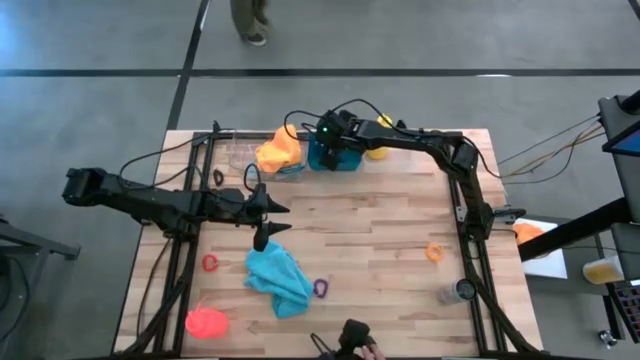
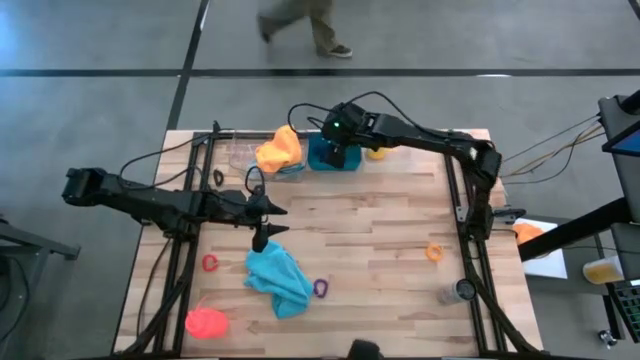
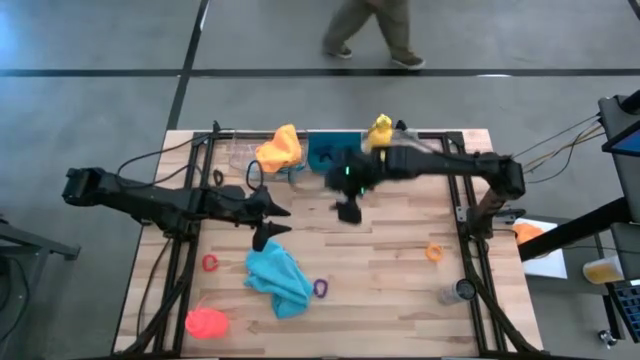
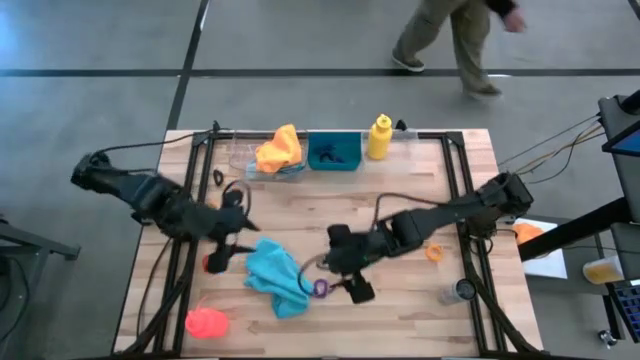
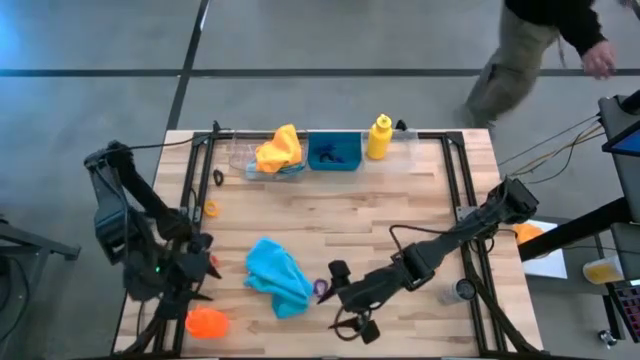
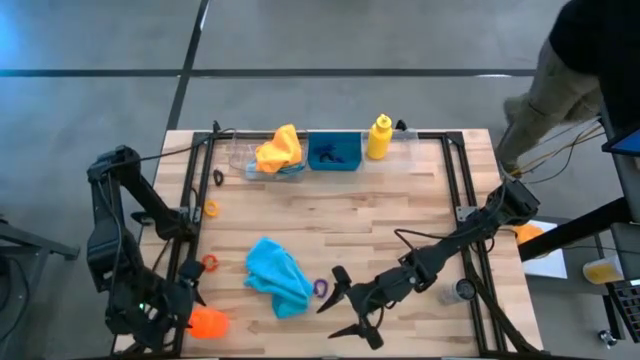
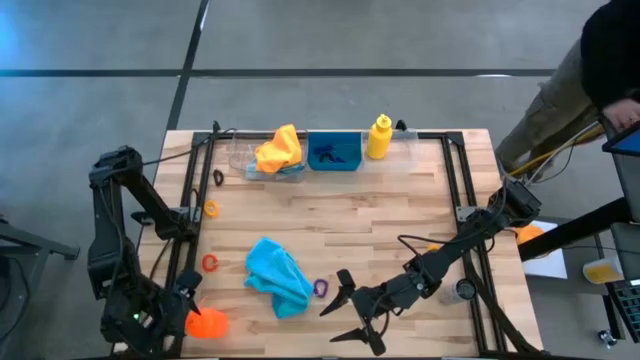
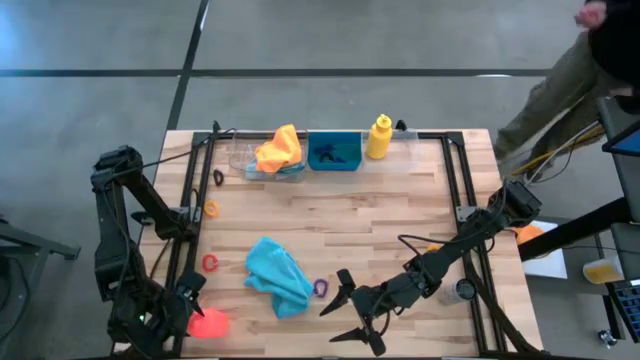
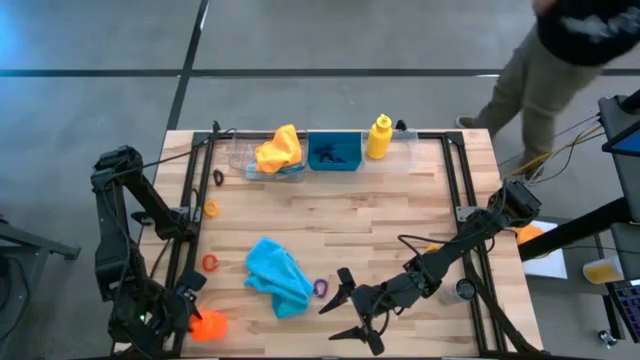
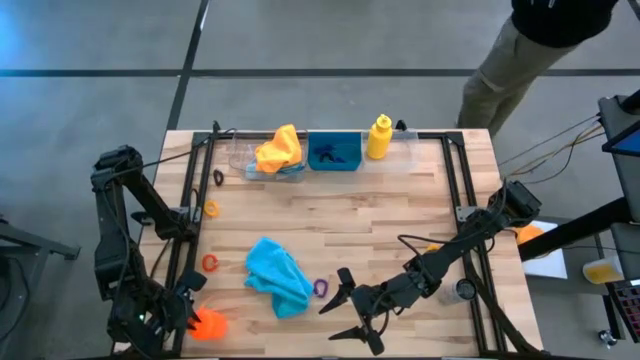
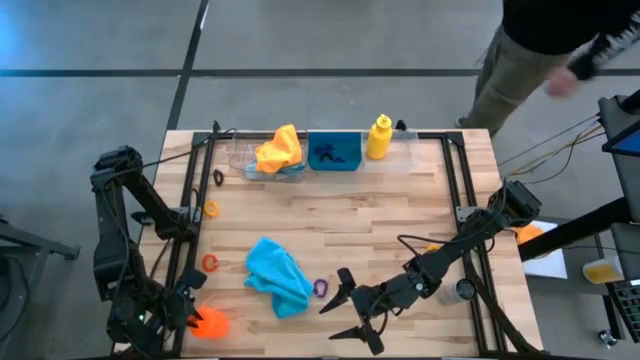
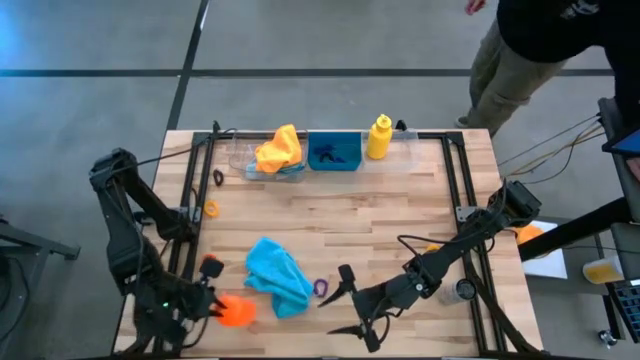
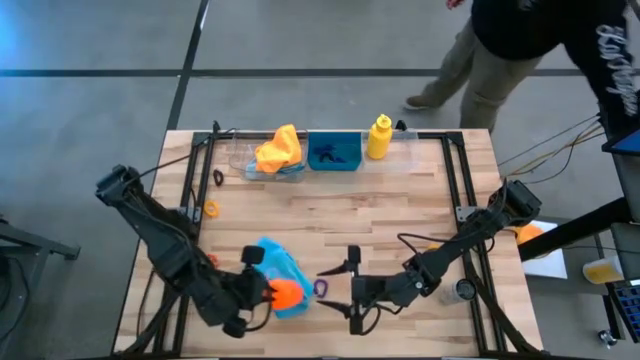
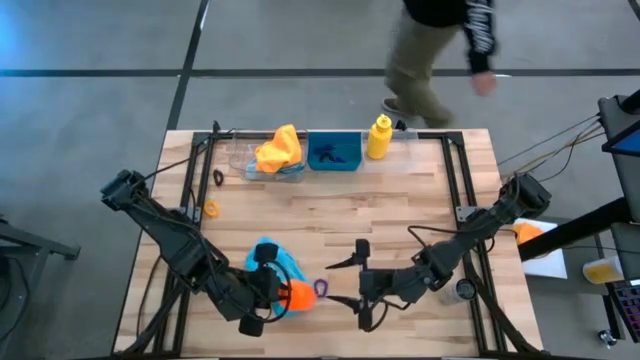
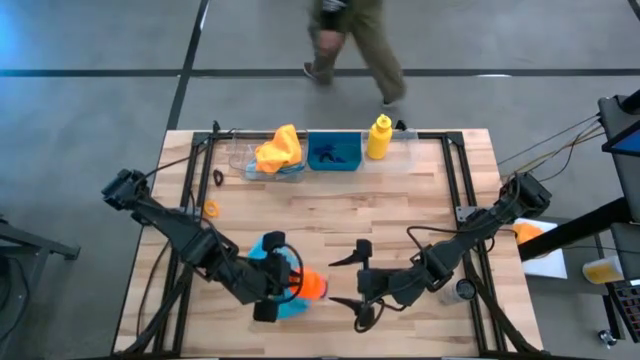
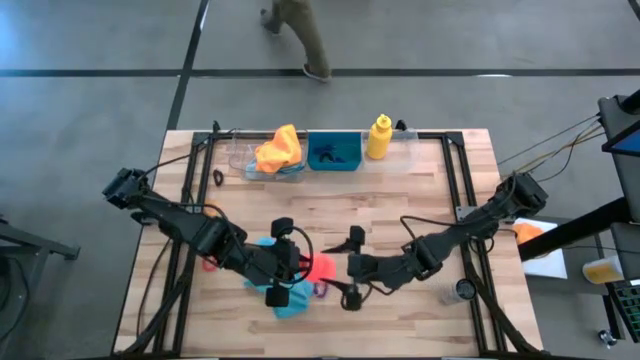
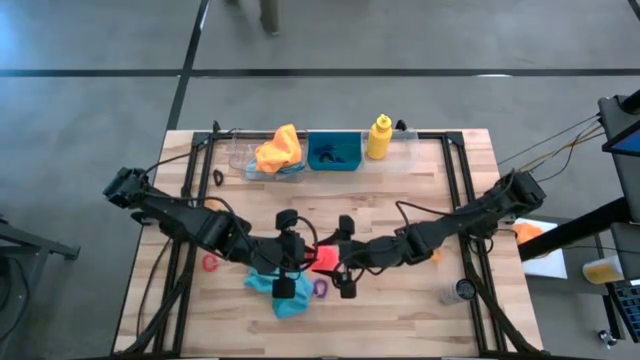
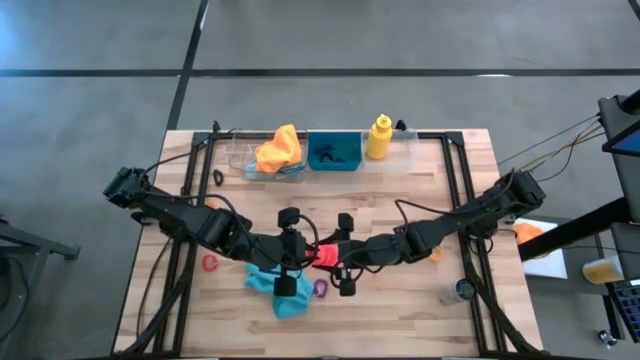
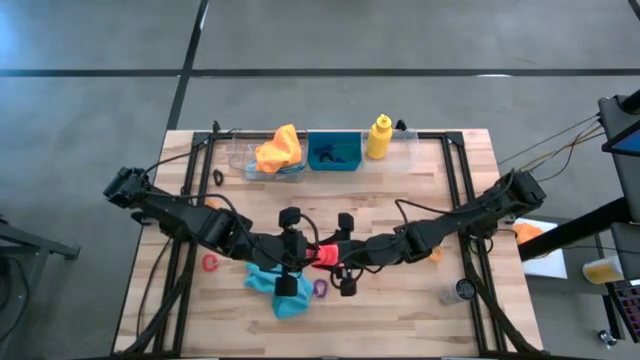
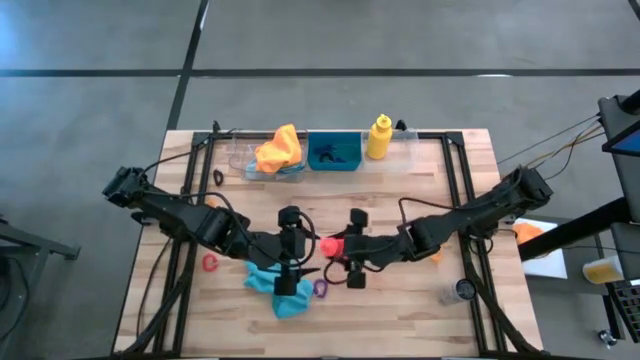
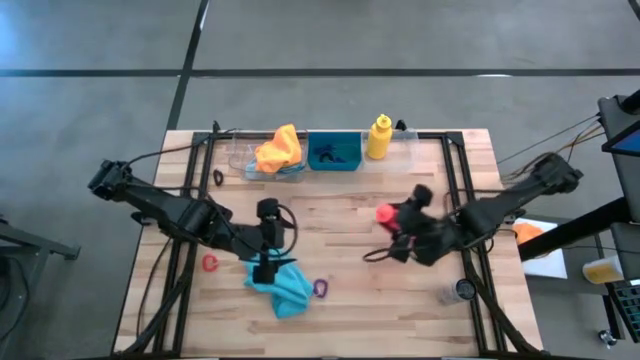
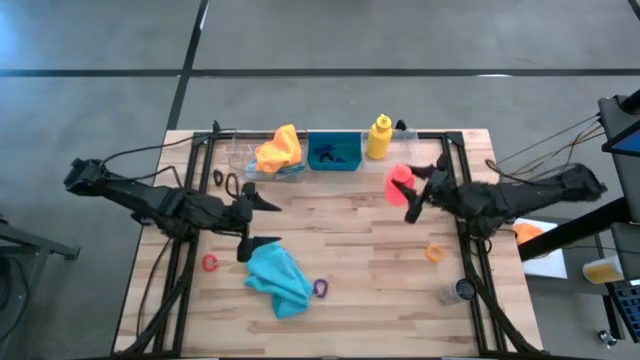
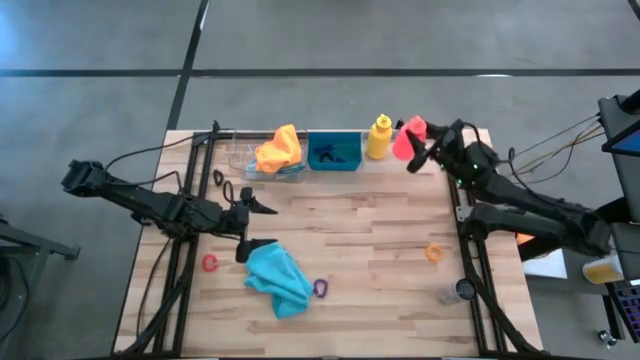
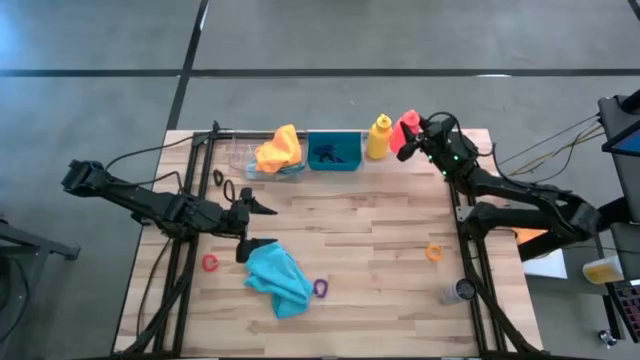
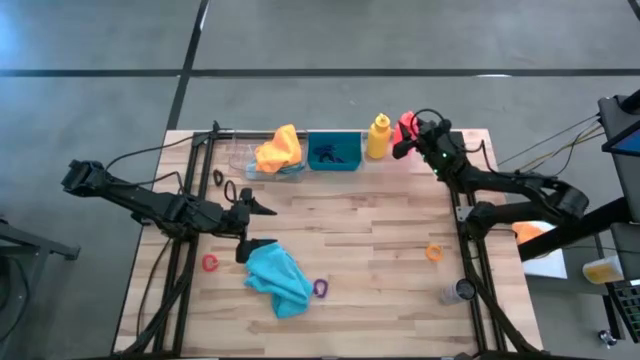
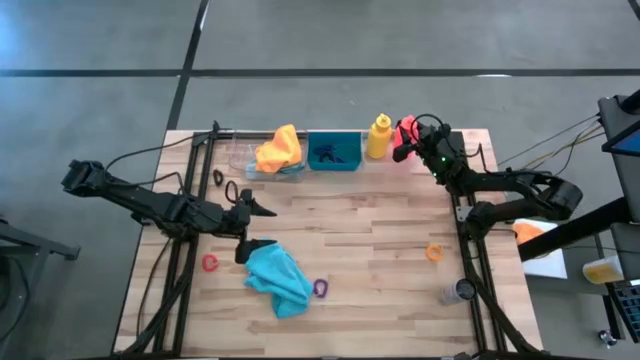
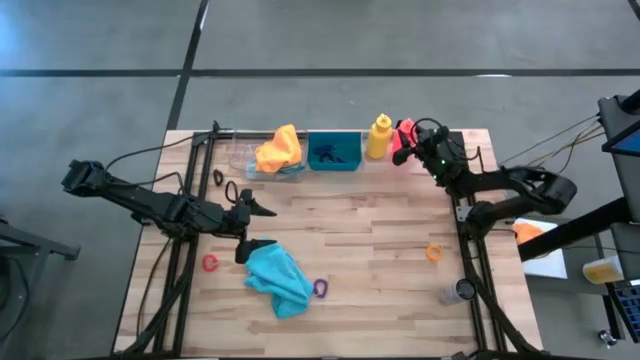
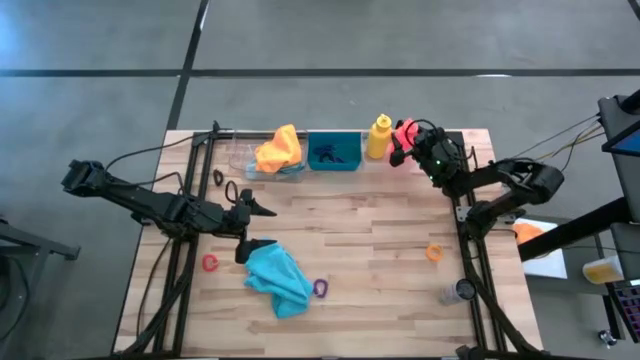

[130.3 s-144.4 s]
Task: Pick & Place Sports Items
Put the orange water bottle into the white bin

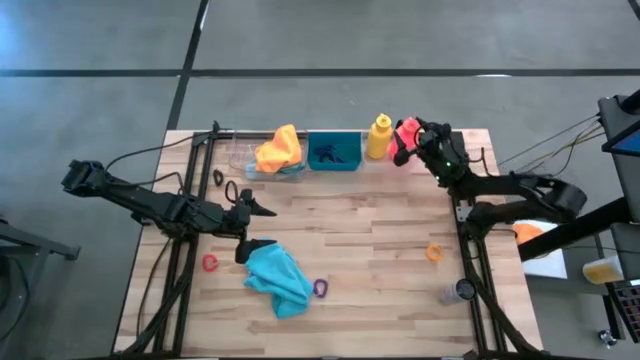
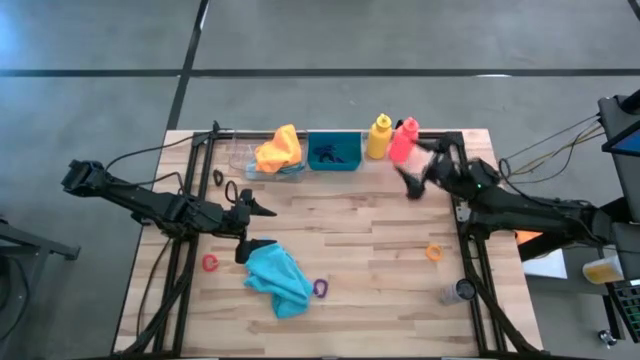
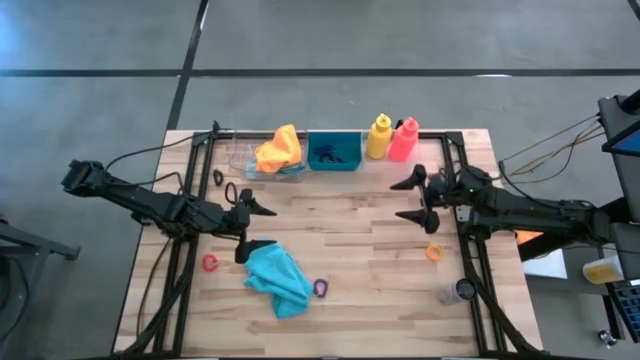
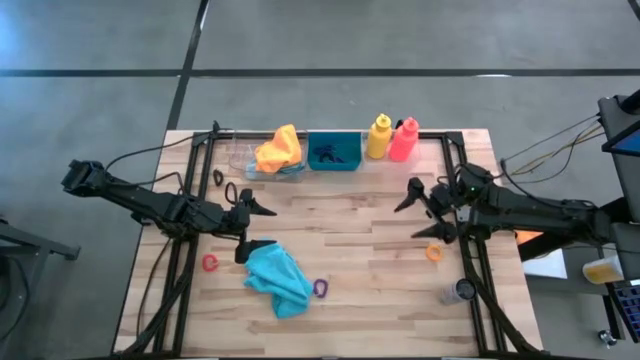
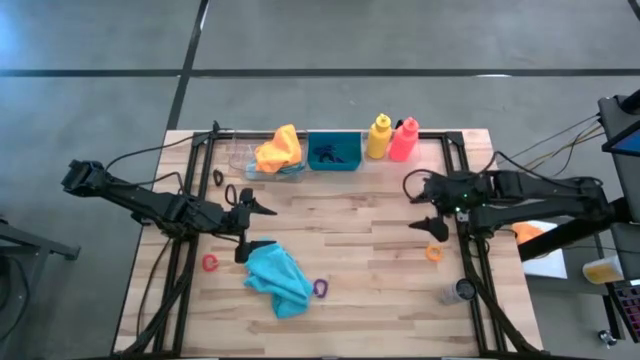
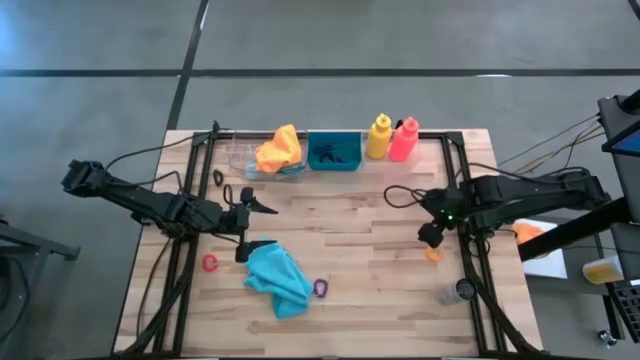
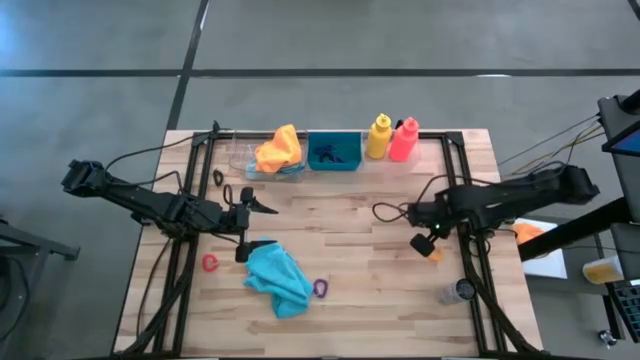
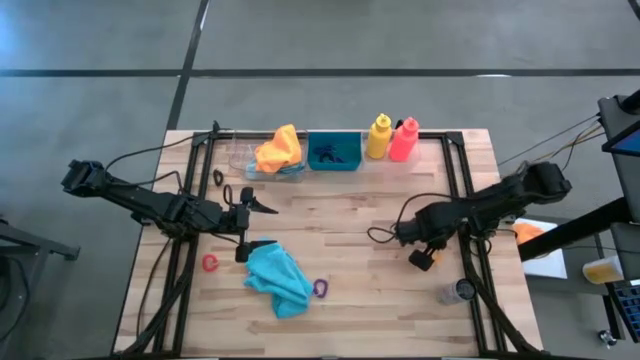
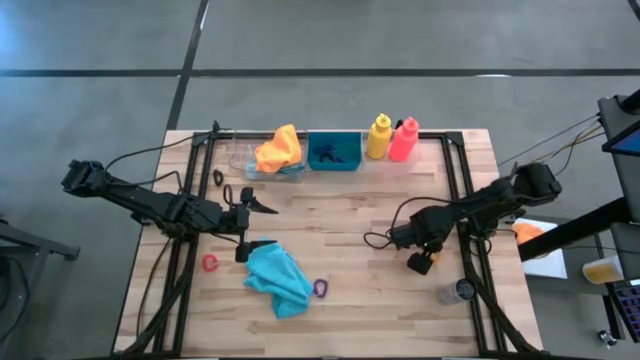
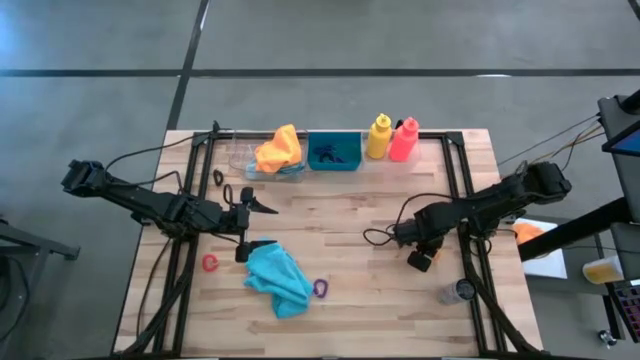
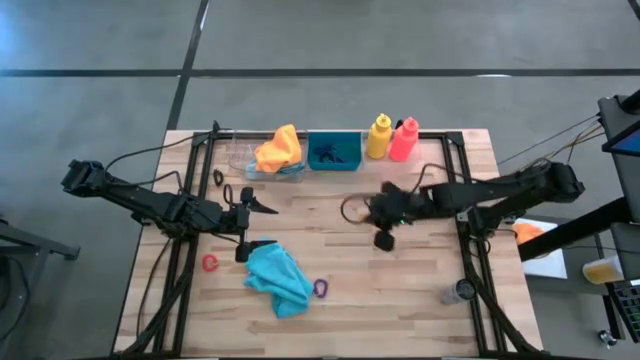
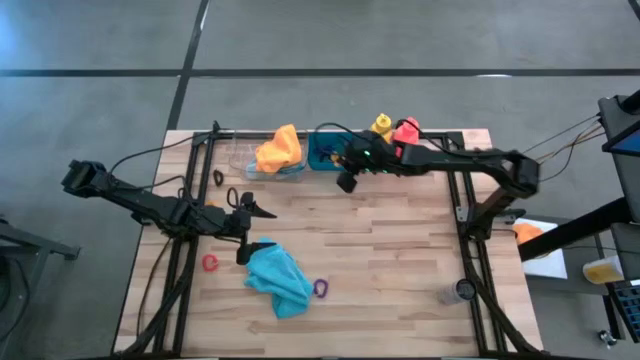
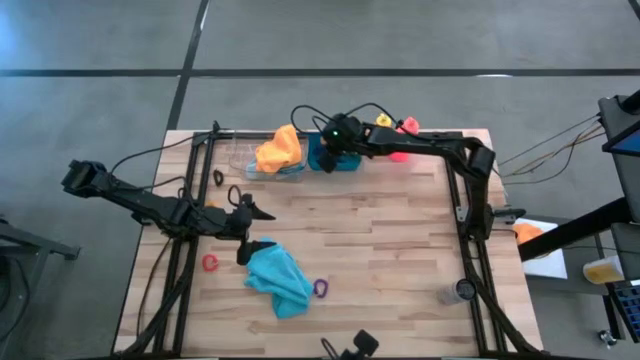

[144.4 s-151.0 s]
Put the right yellow spring keychain into the blue bin
